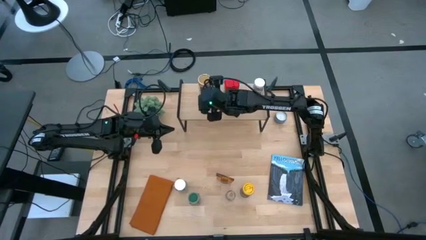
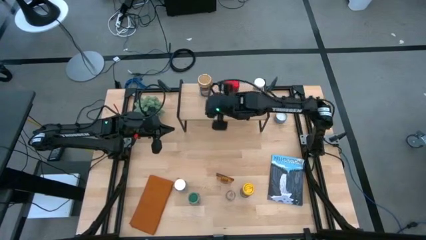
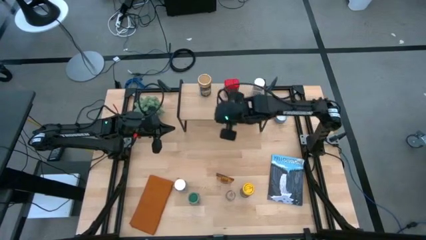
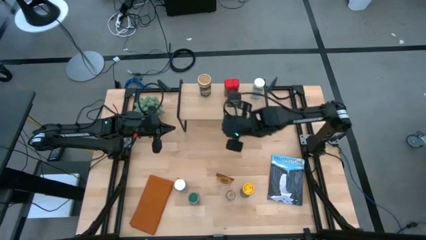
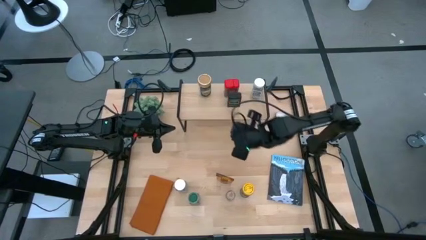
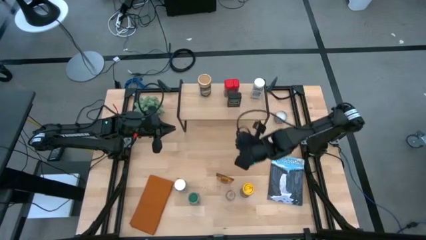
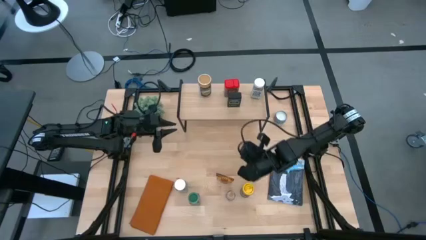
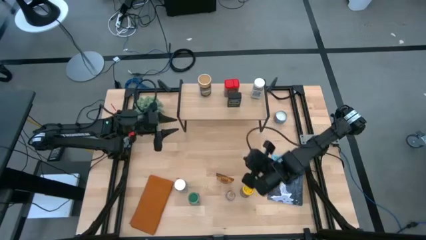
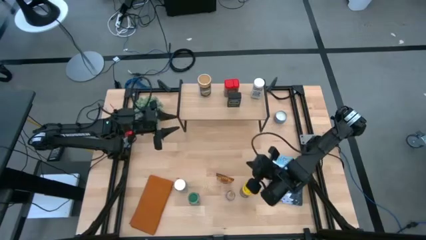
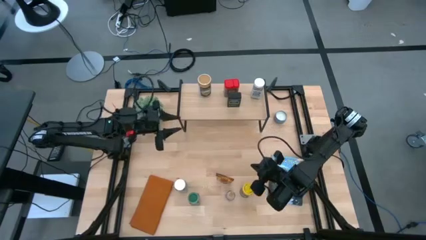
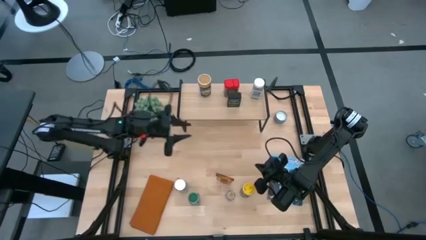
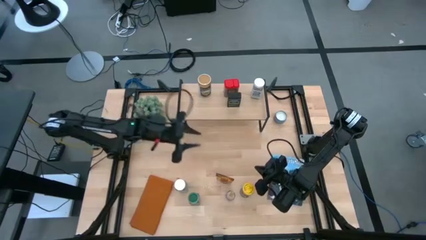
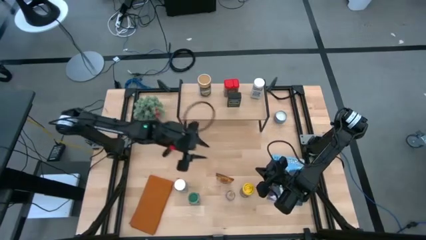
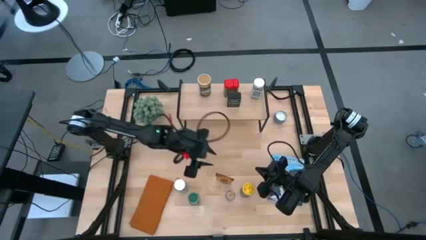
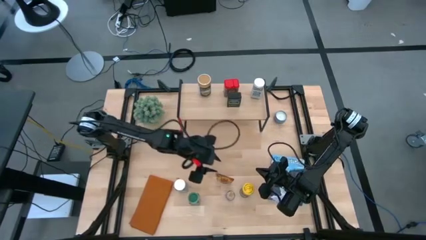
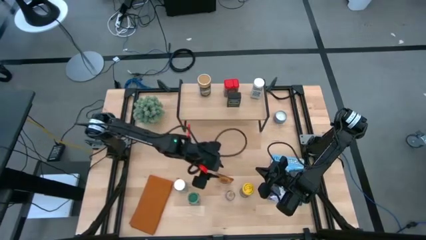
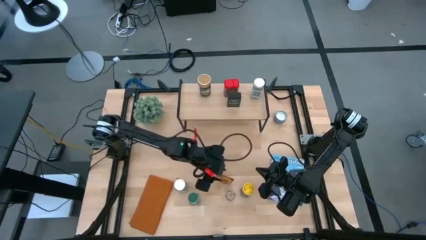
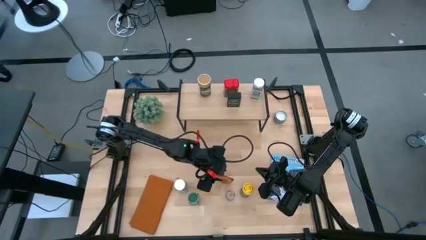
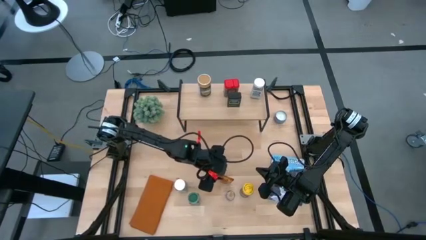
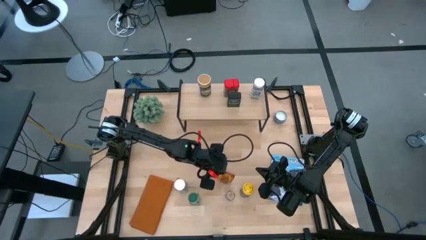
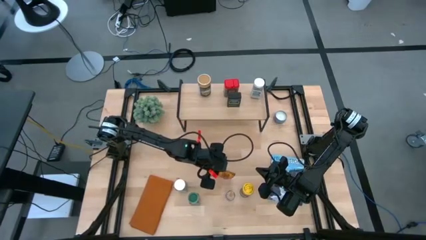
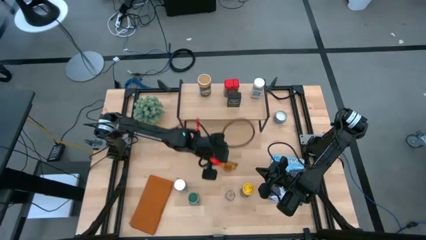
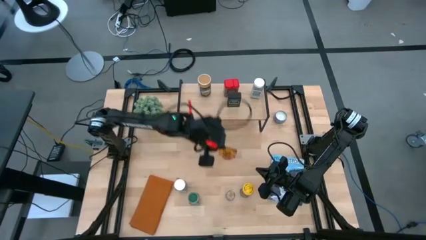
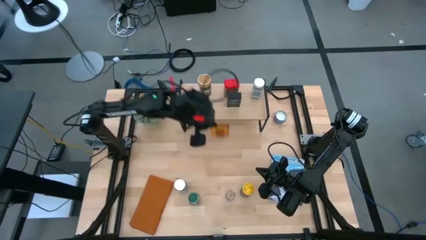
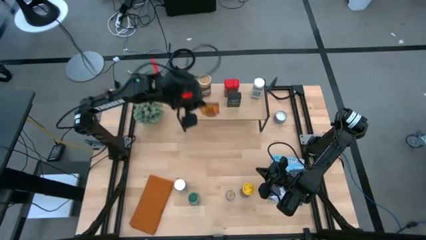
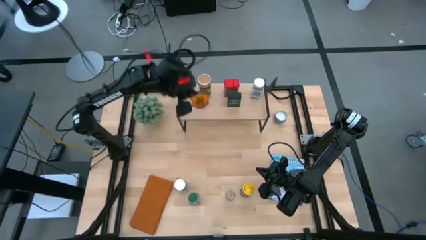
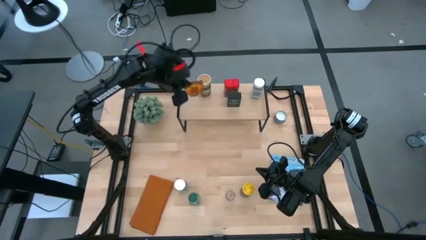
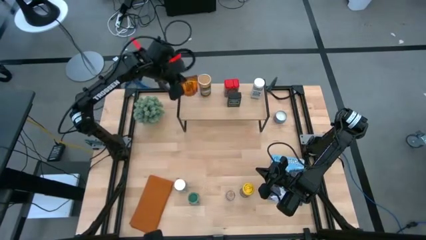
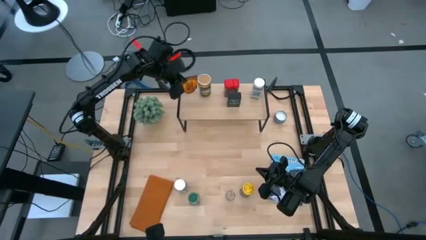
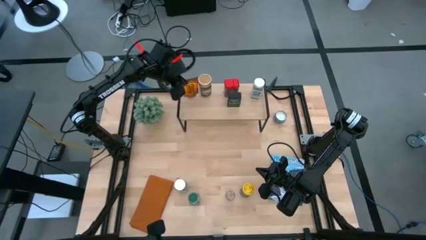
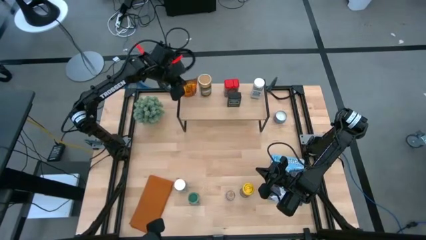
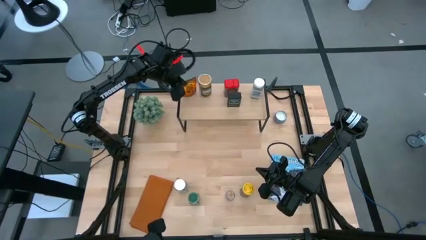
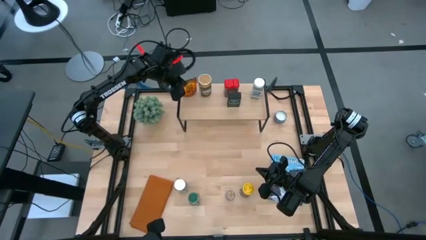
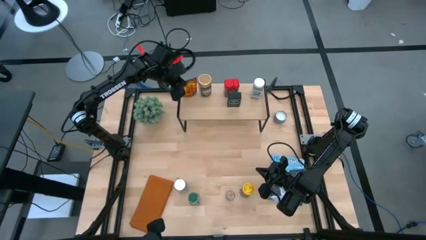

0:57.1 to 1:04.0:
Task: Shelf spices
Put the orange seasoning bag on the shelf
